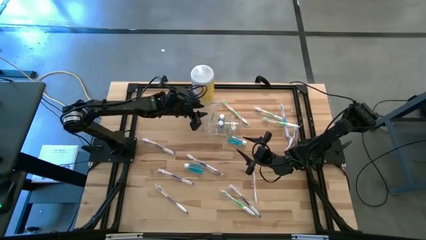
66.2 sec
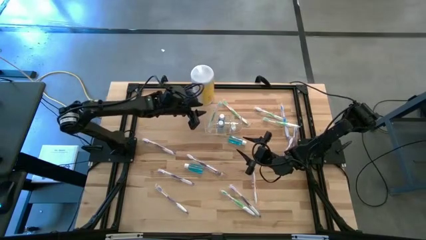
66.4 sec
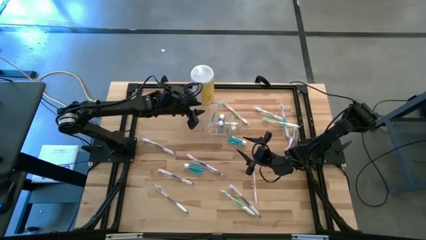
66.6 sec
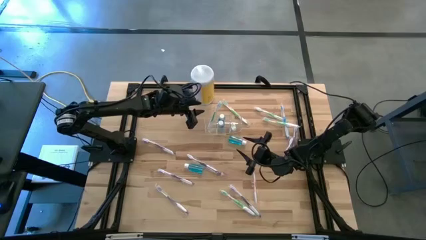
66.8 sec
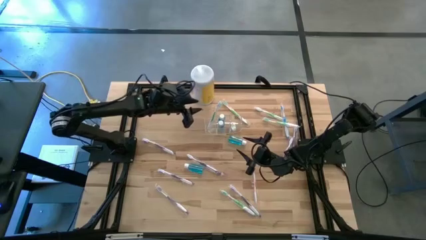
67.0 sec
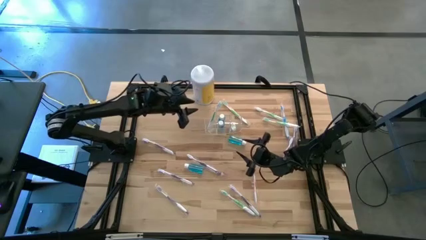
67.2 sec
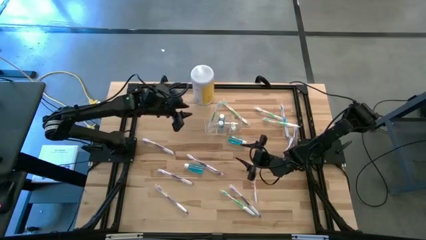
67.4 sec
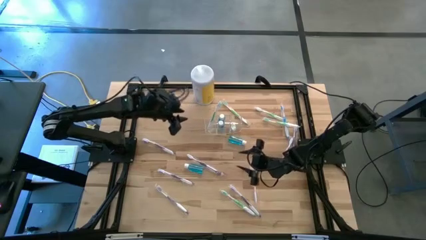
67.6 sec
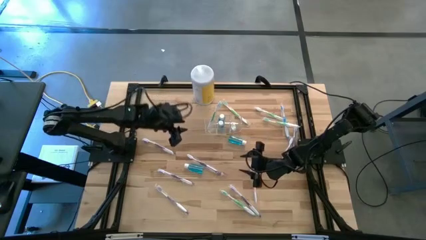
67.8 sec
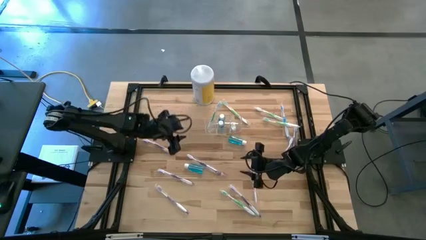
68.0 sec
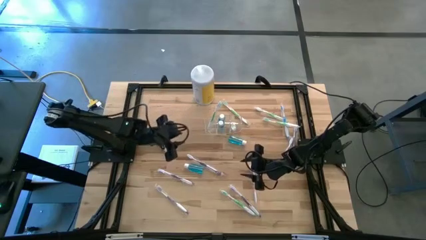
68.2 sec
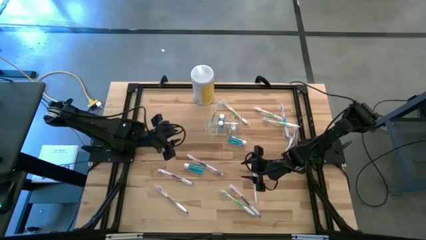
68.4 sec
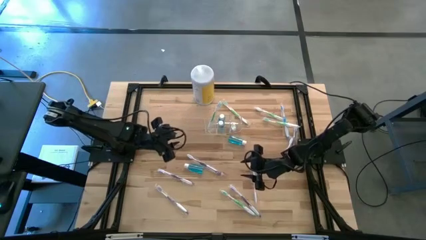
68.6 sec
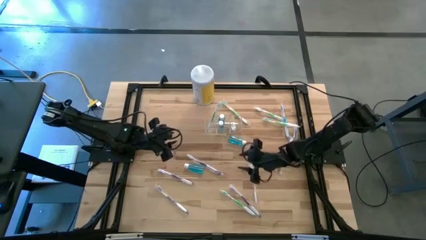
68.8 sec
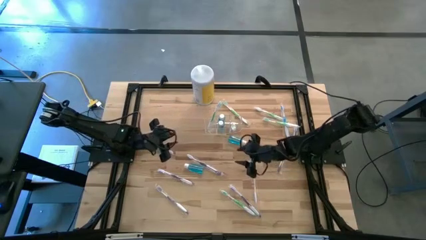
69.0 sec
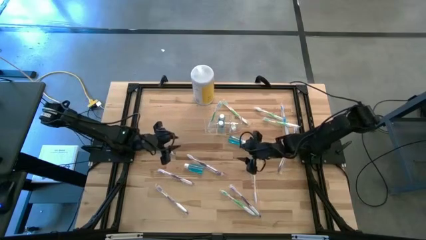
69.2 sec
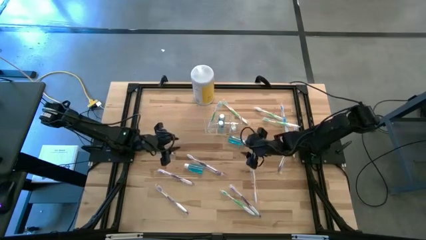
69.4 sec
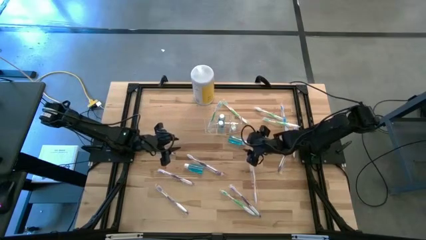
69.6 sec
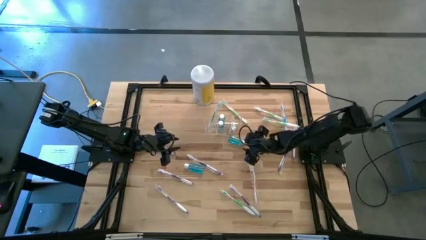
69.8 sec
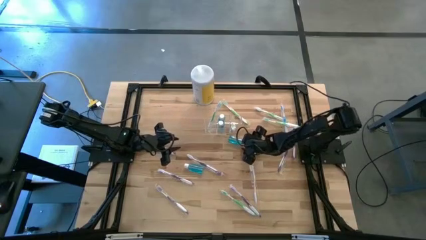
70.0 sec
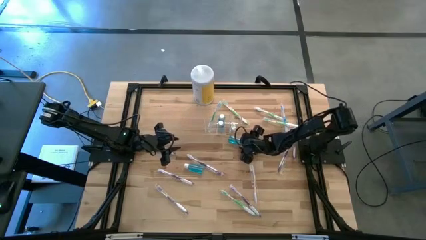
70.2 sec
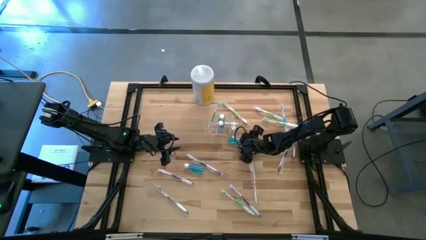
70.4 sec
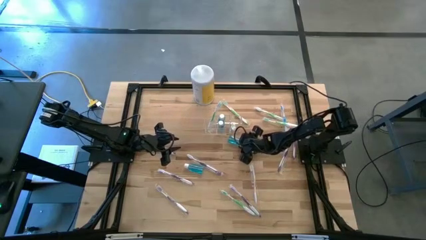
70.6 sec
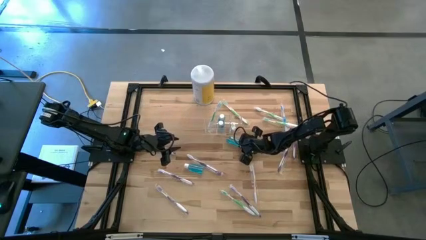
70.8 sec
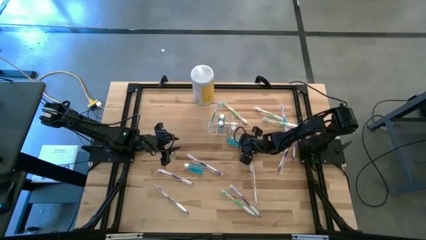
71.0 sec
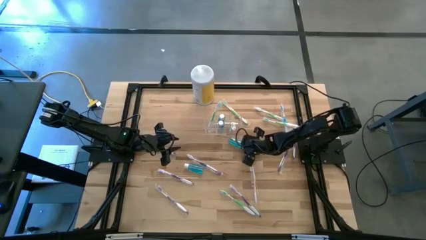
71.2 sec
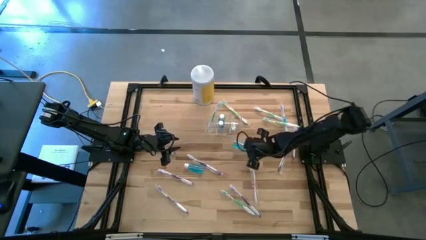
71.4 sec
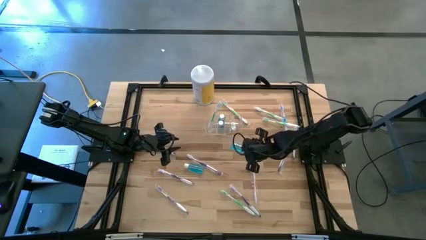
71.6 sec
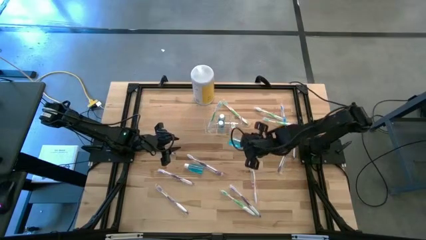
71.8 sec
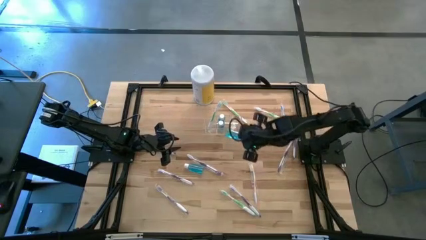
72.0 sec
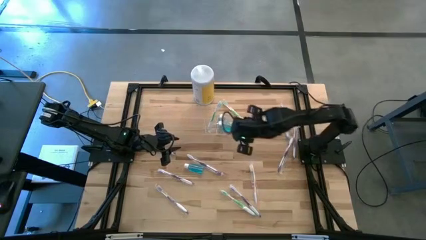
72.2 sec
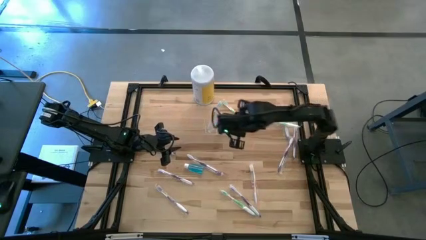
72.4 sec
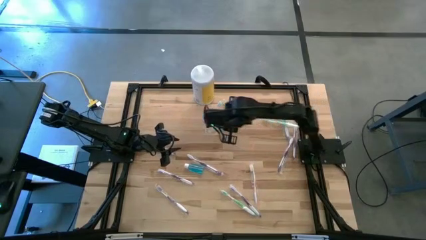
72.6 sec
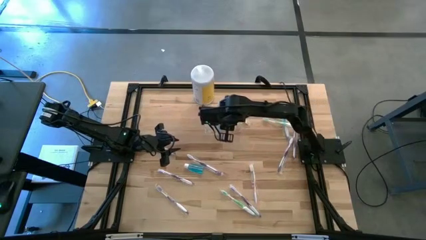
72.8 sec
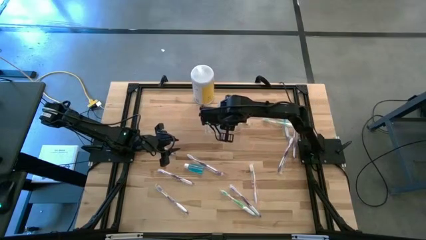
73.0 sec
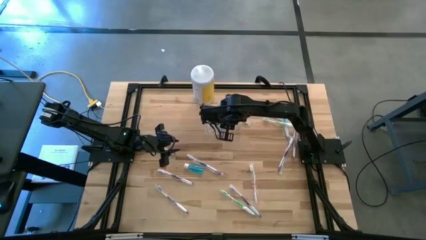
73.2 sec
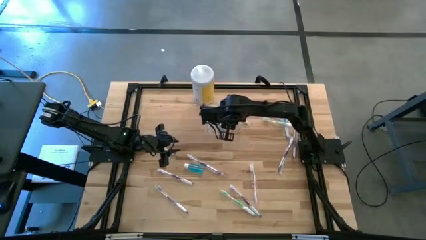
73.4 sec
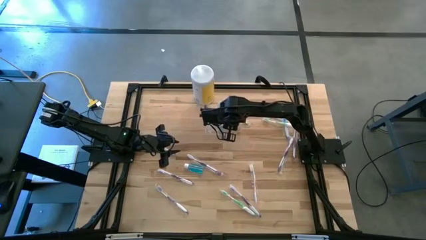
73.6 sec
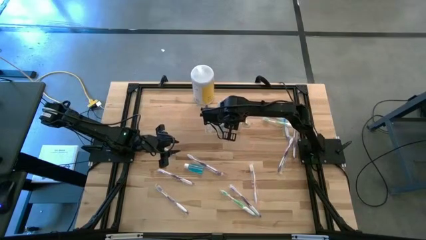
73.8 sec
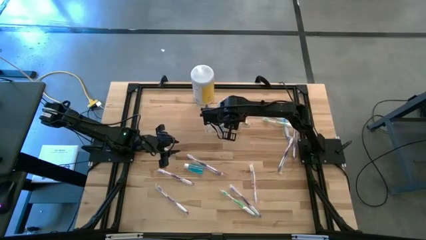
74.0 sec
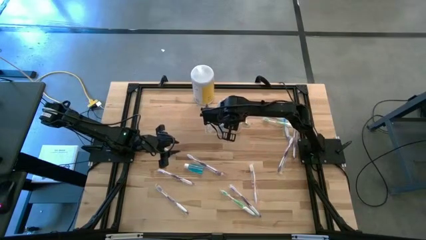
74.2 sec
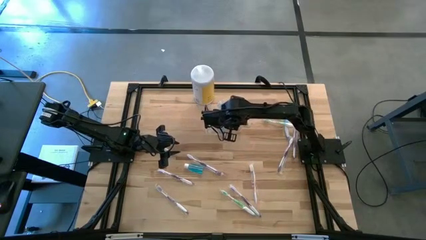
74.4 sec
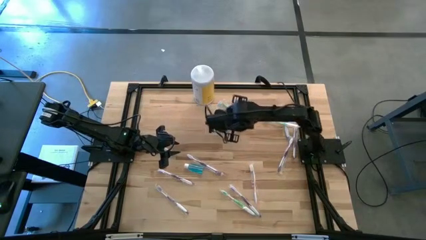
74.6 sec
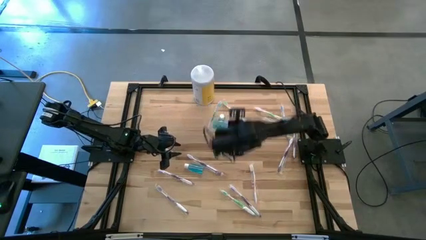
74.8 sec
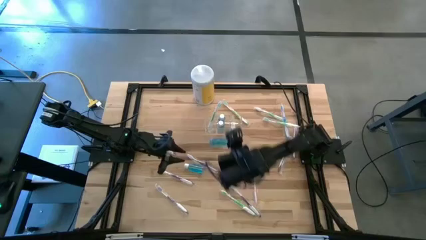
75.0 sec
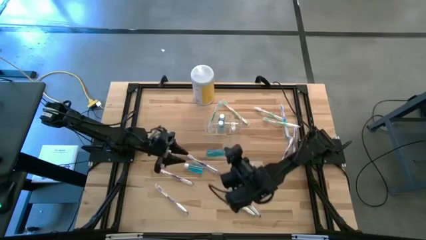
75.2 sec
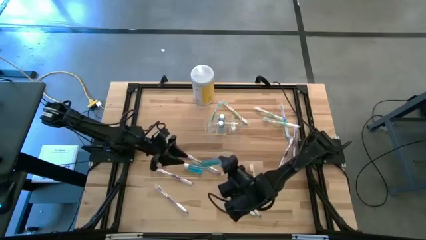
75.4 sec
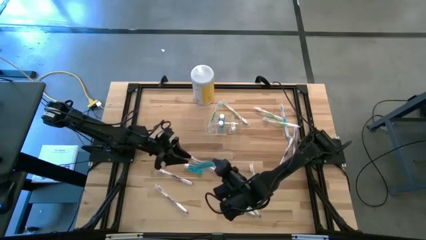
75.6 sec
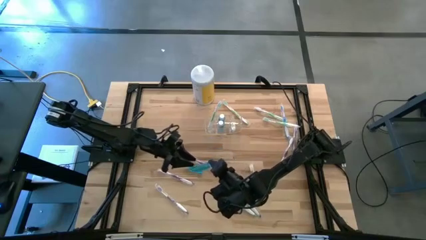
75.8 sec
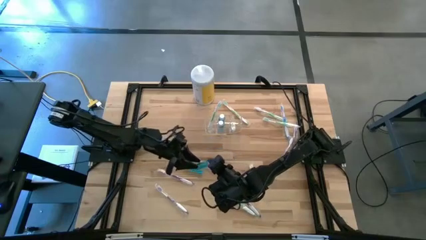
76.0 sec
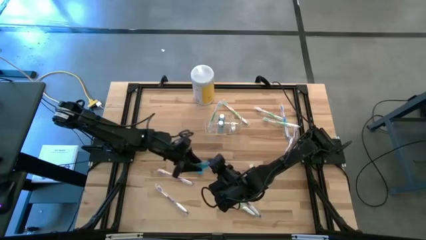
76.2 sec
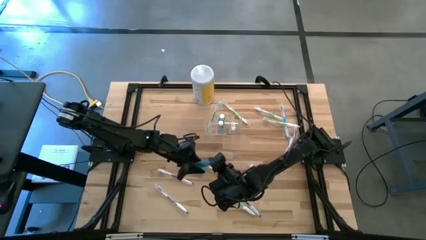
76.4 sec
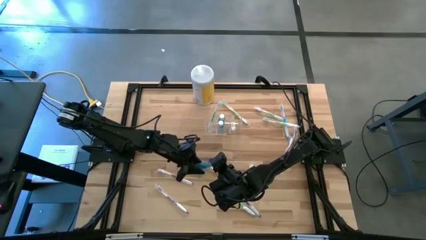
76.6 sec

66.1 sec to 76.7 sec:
Task: Pick & Place toothbrushing station
Put the top mouthwash into the transparent organizer
